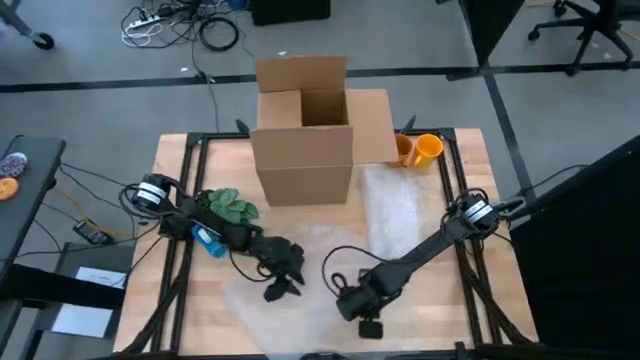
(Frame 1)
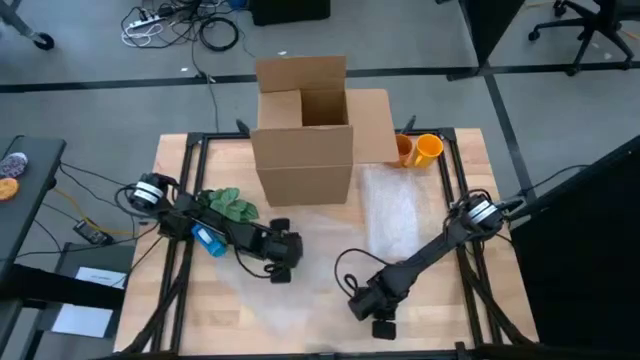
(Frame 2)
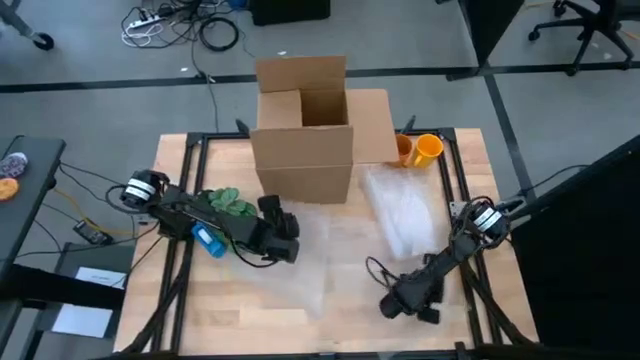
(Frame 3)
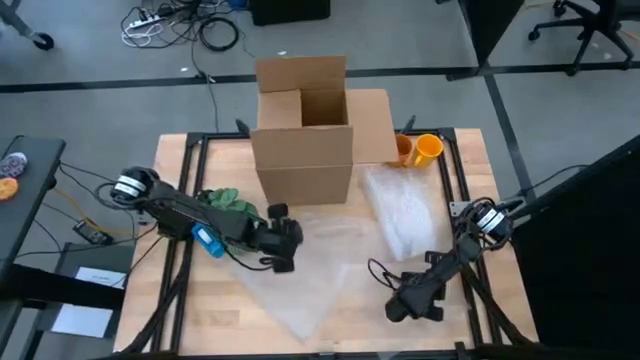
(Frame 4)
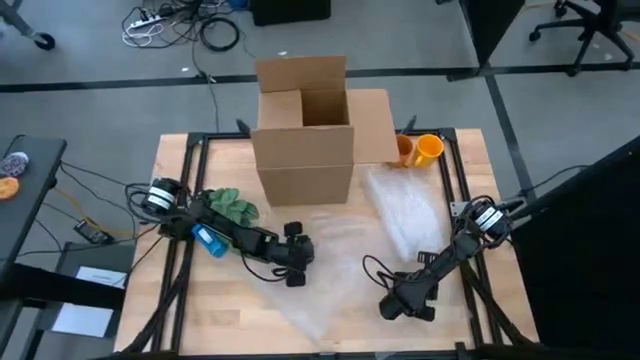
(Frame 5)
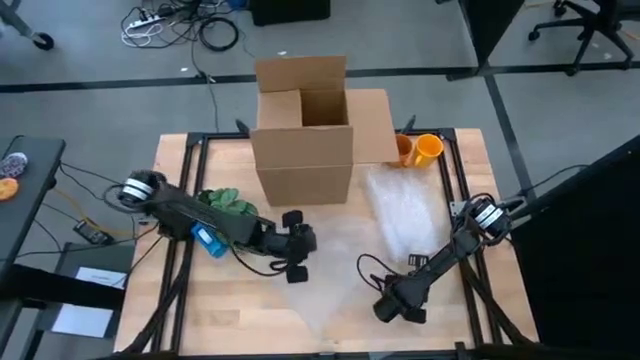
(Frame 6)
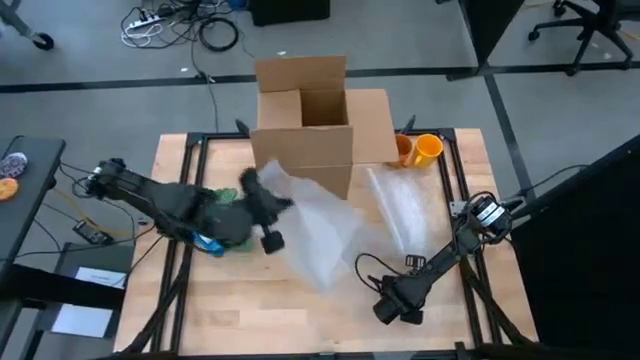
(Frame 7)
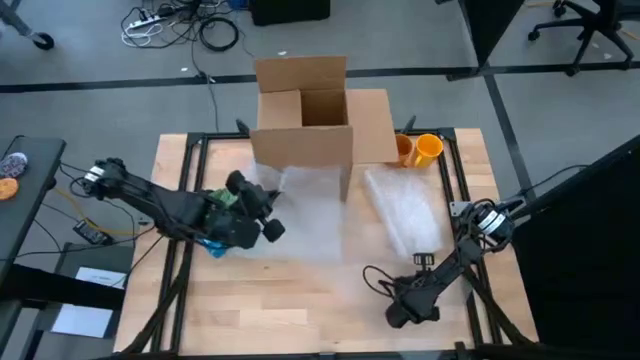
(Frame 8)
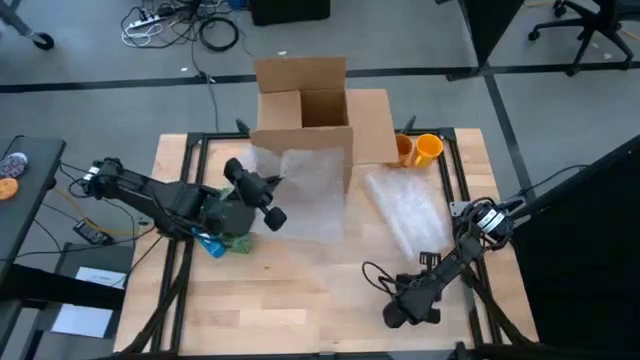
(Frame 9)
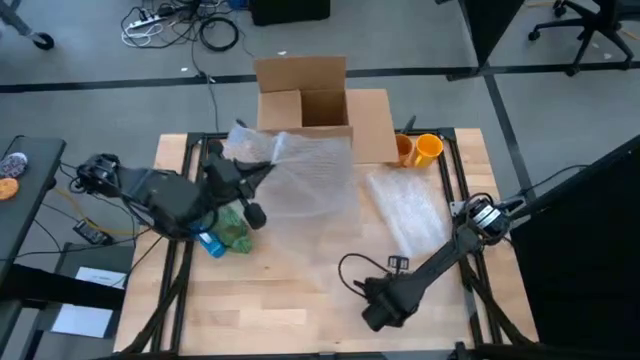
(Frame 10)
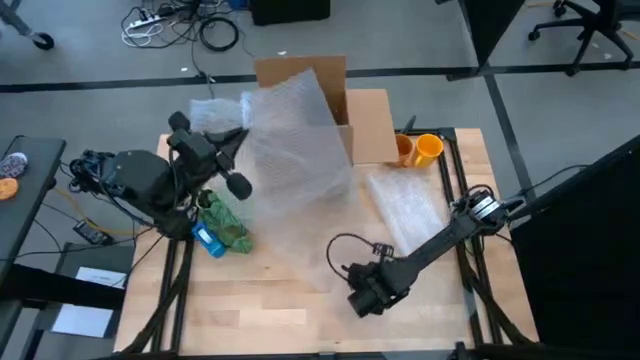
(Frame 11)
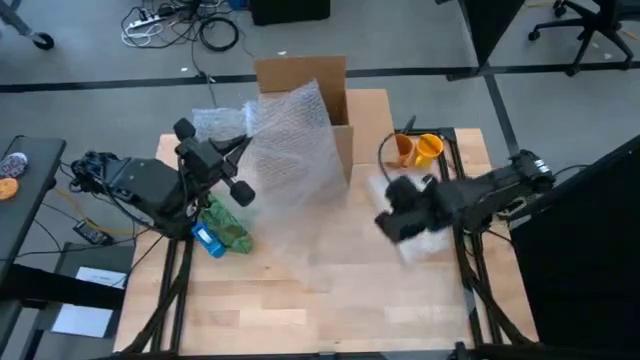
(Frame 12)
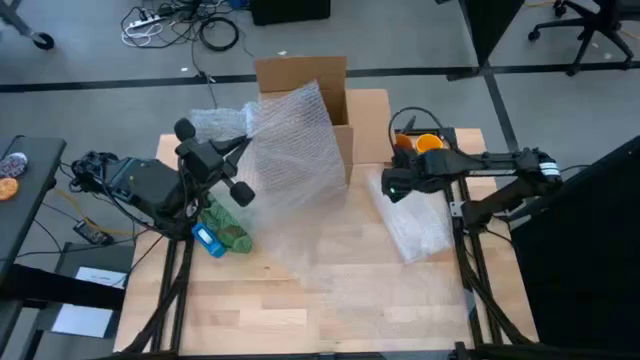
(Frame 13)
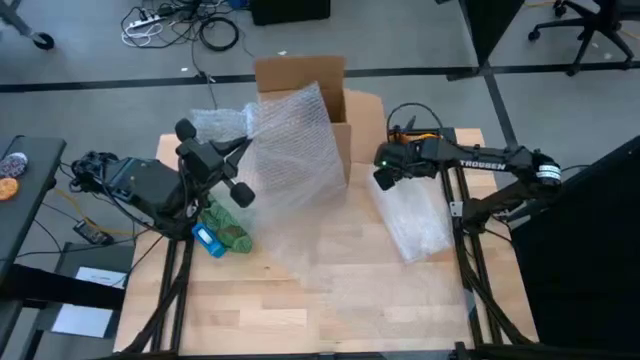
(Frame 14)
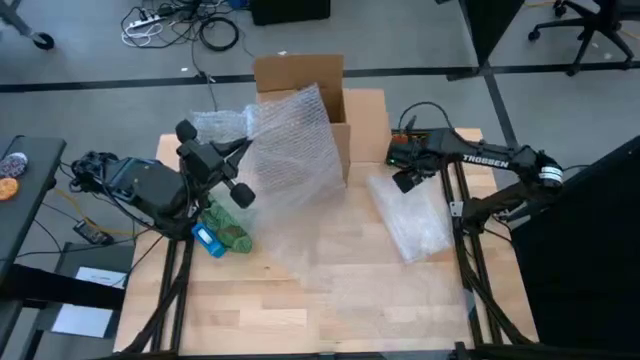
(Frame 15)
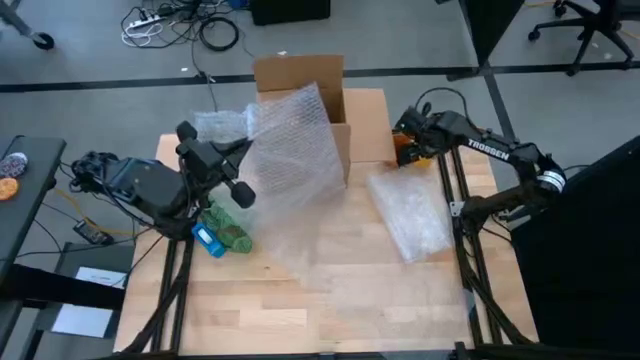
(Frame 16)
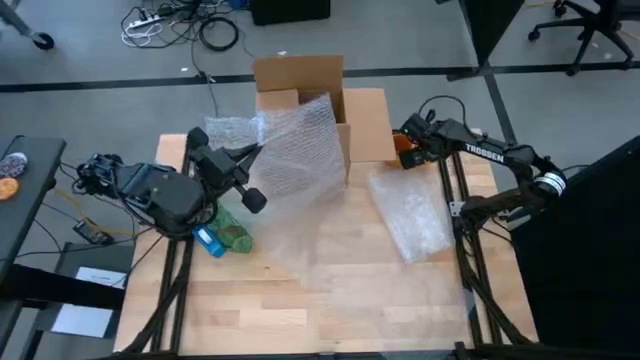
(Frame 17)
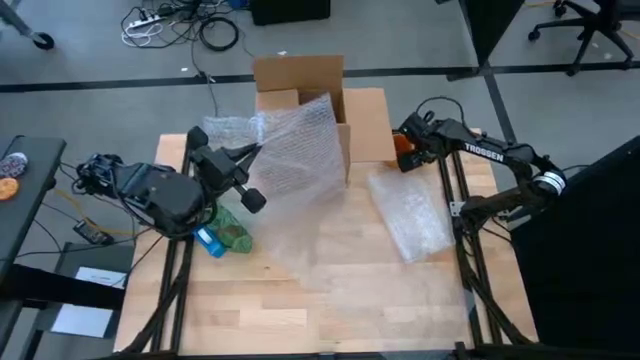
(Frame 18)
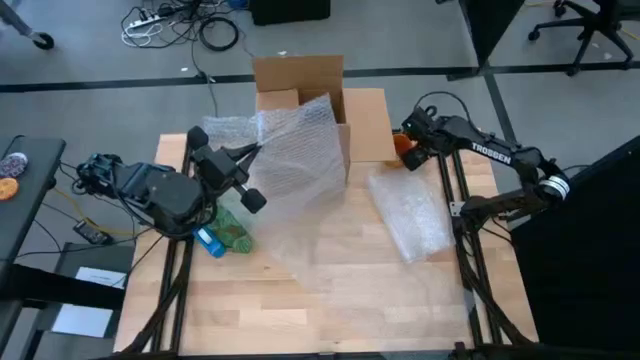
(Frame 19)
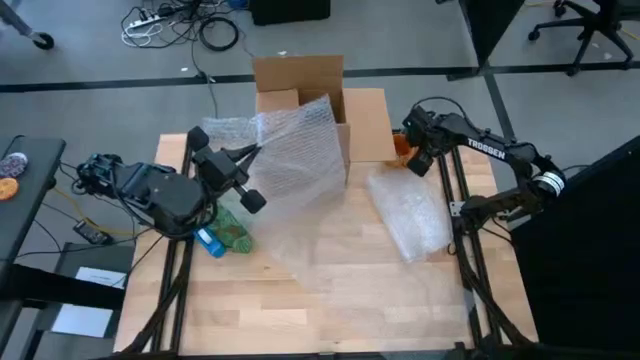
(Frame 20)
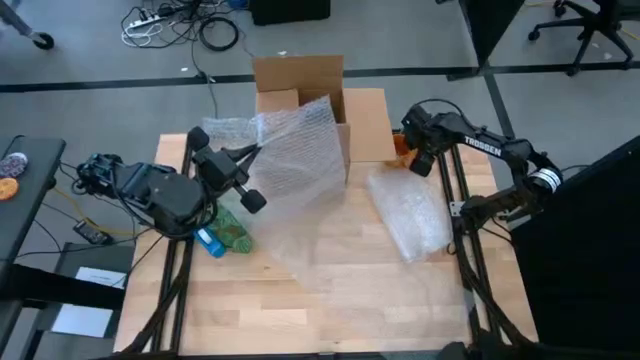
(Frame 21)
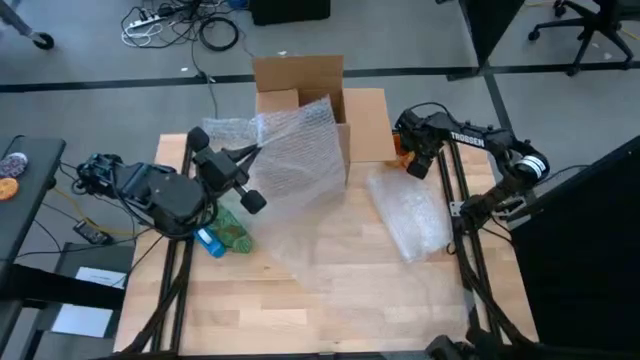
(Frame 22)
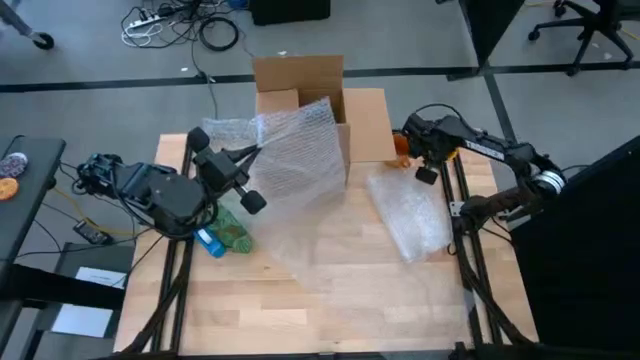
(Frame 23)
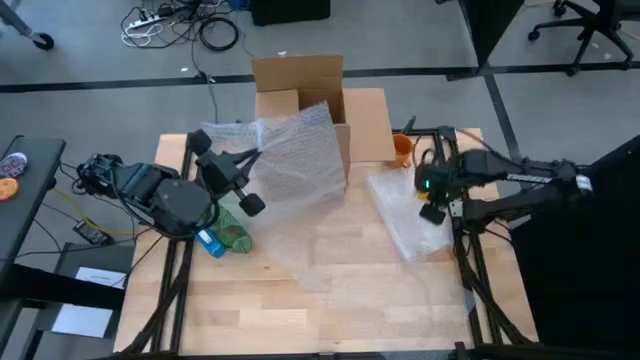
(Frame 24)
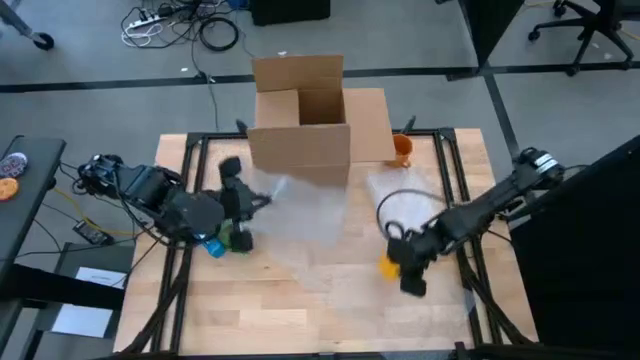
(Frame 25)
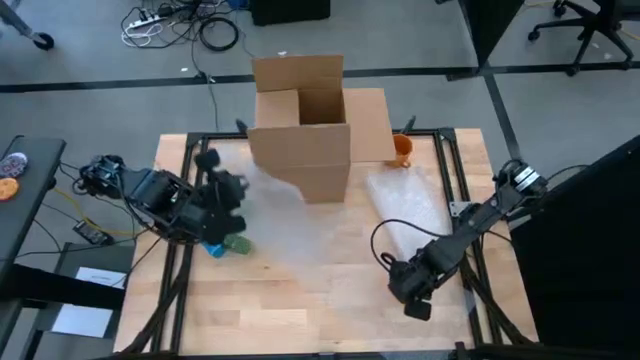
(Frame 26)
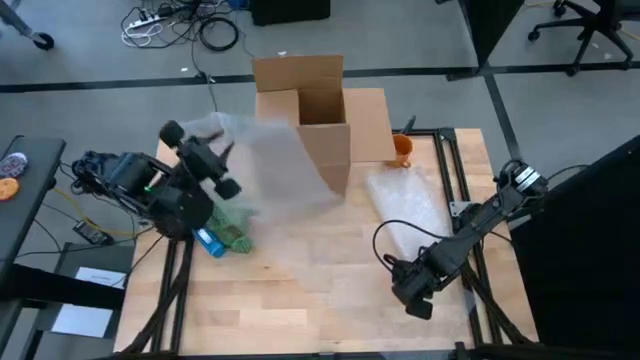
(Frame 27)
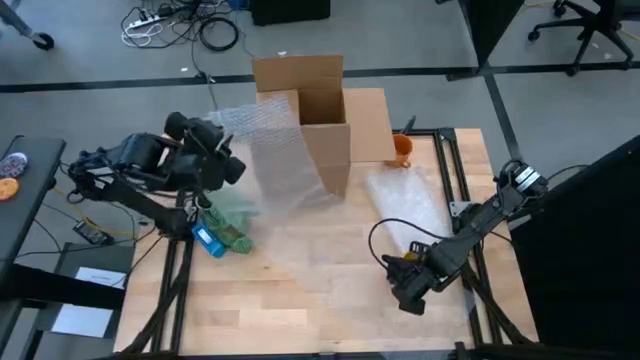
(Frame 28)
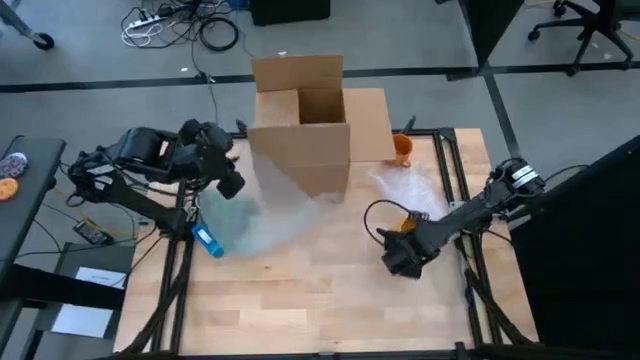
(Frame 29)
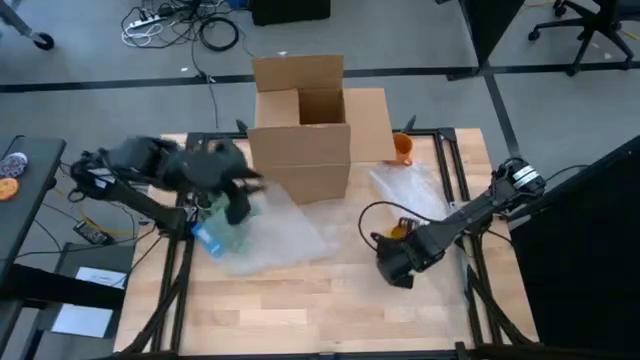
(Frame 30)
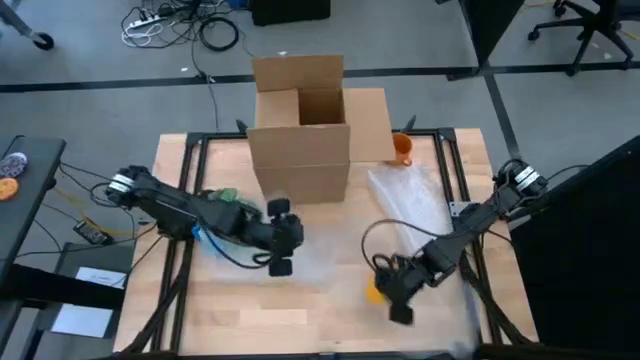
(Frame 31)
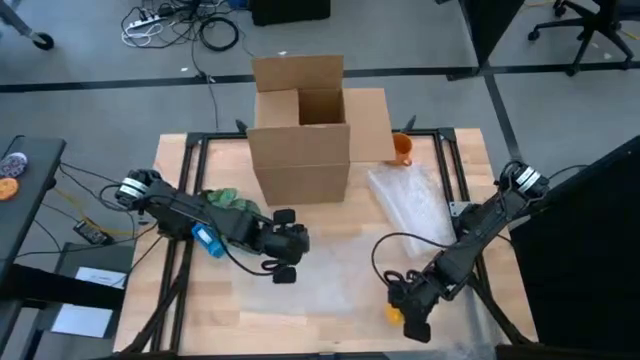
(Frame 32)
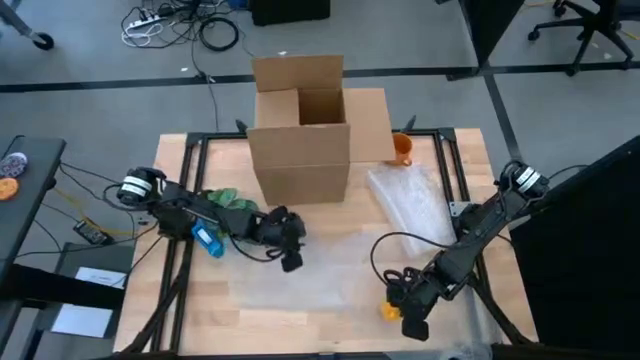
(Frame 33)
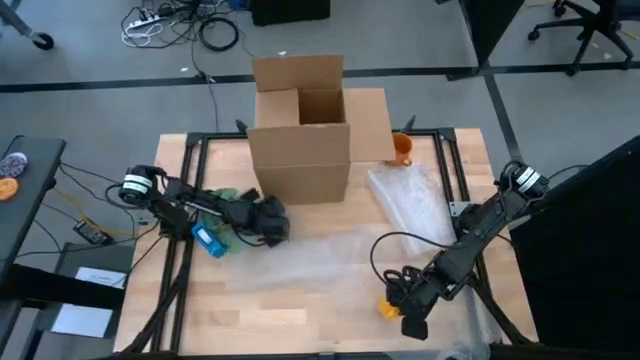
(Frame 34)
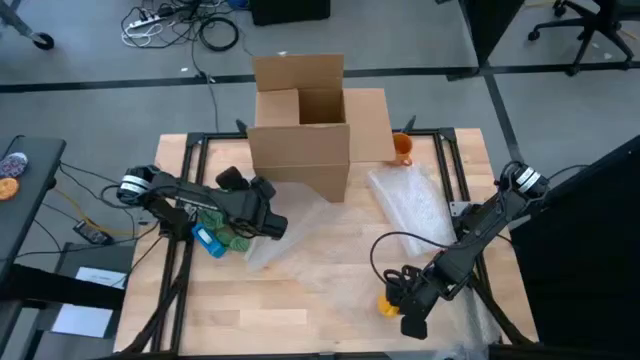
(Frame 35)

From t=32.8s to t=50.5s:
Task: wrap mug
Wrap the yellow mug with the bubble wrap

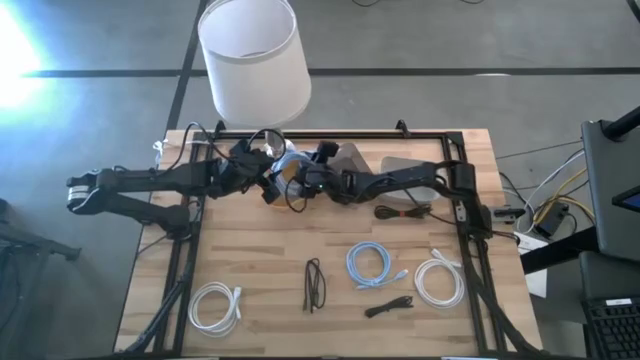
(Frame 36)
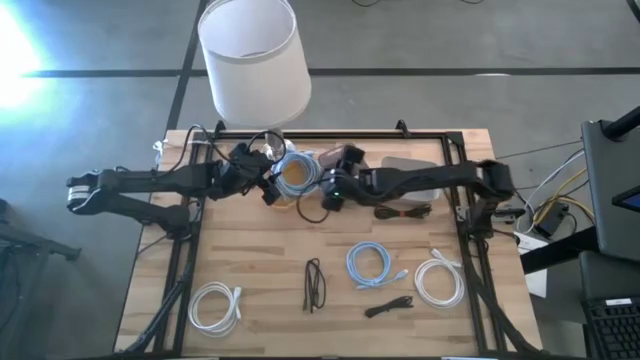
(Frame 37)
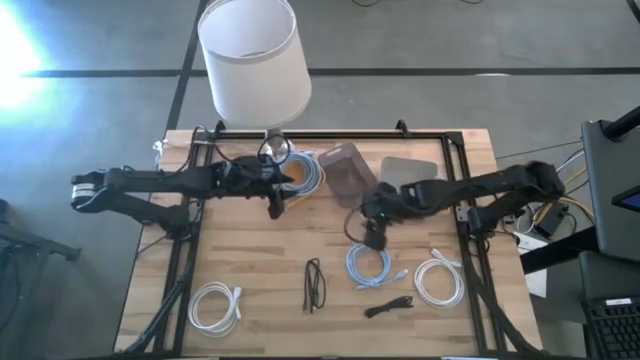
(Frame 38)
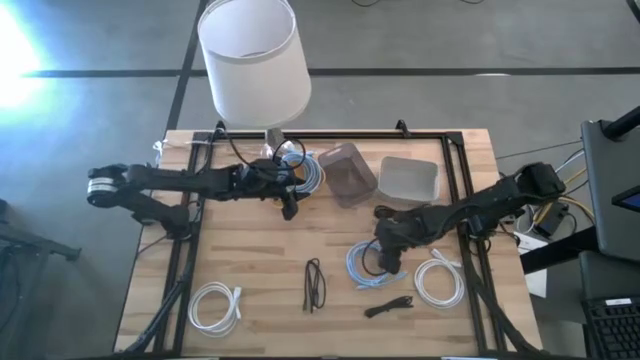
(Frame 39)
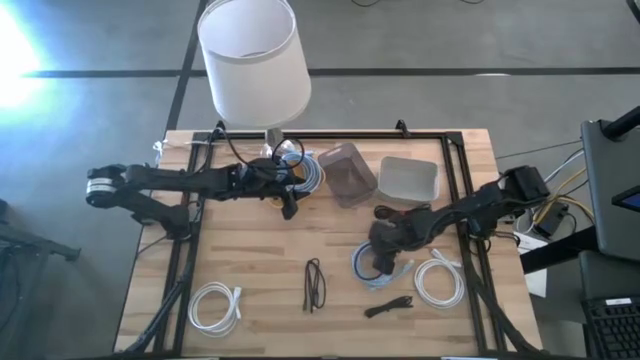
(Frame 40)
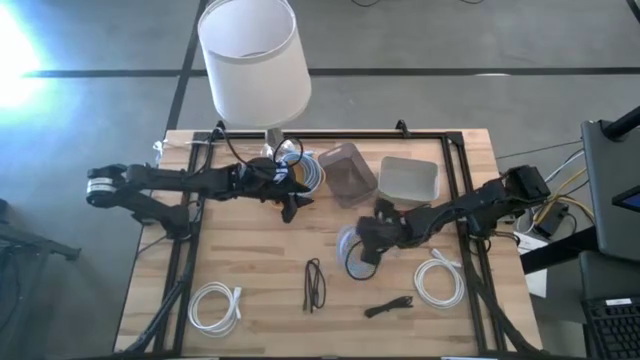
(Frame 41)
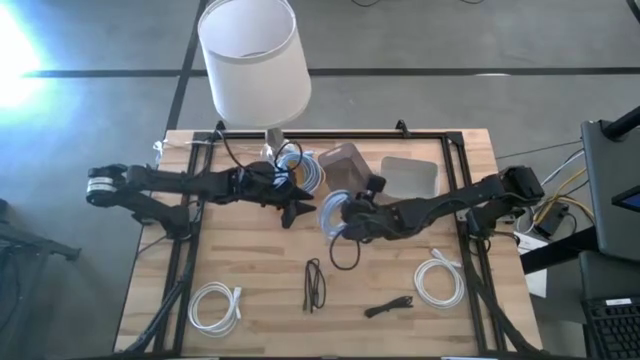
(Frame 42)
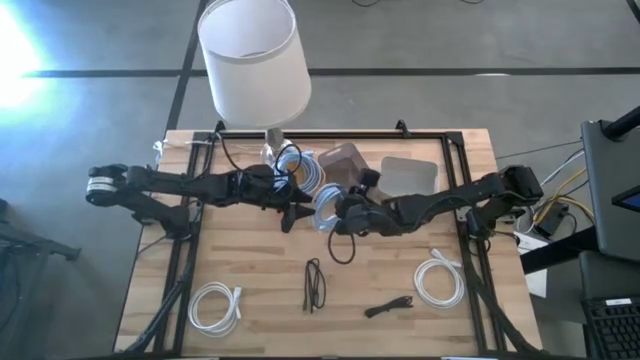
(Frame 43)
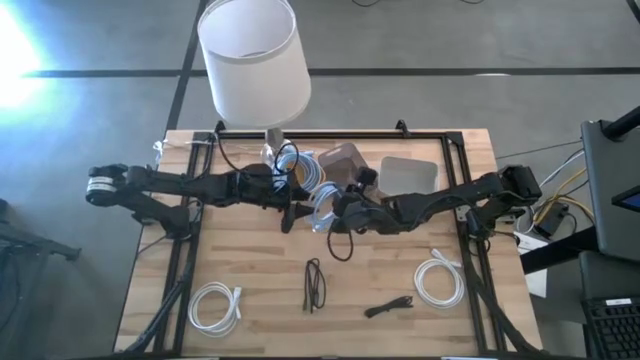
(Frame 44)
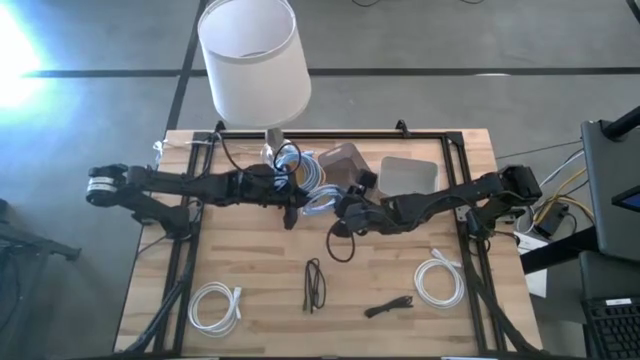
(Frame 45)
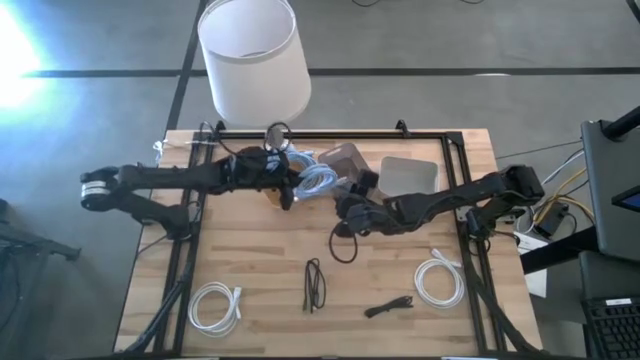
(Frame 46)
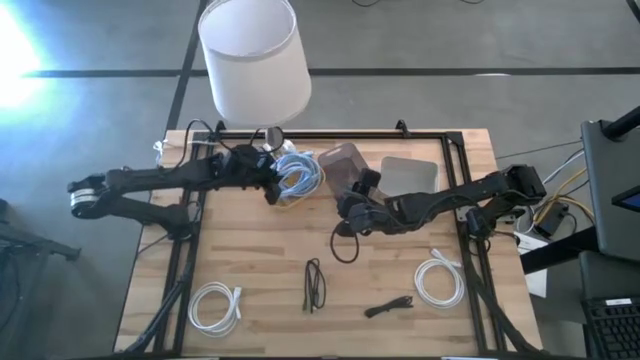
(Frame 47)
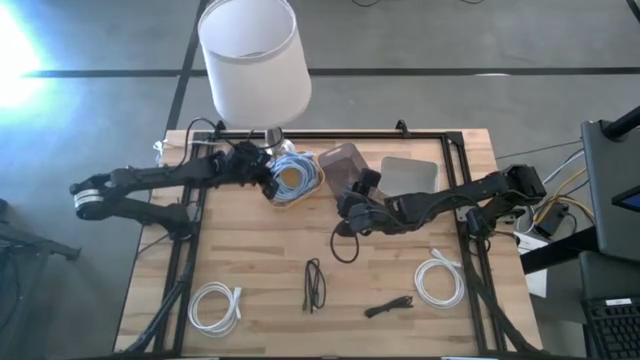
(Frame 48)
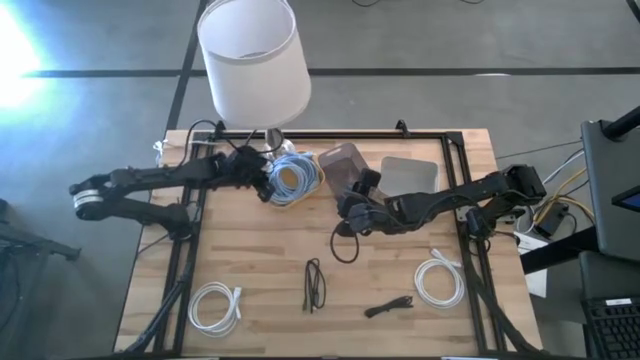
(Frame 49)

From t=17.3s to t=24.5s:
Task: Pick & Place USB Port
Put the blue charger cable into the orange bin
